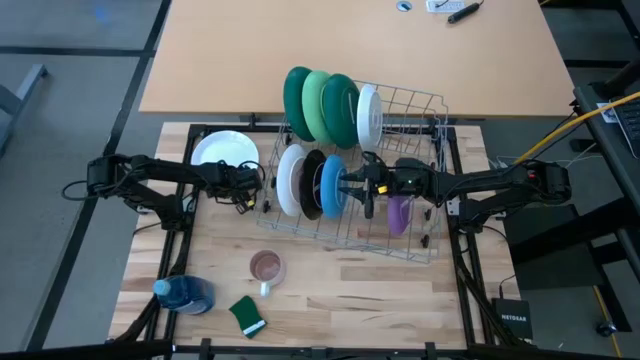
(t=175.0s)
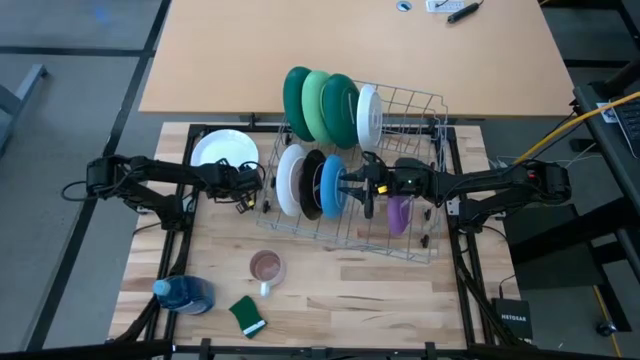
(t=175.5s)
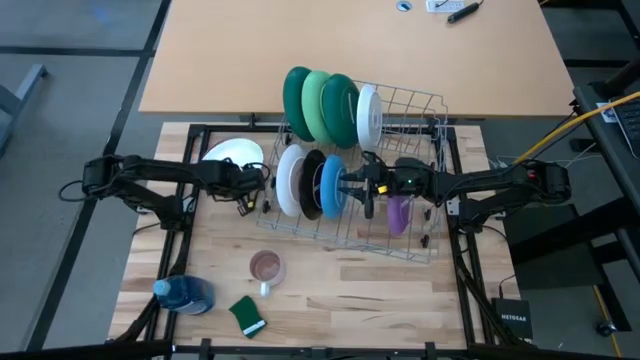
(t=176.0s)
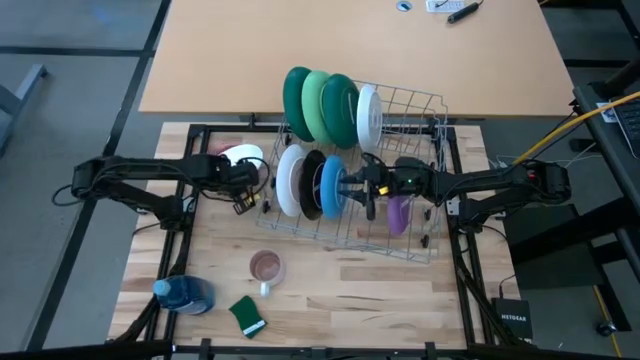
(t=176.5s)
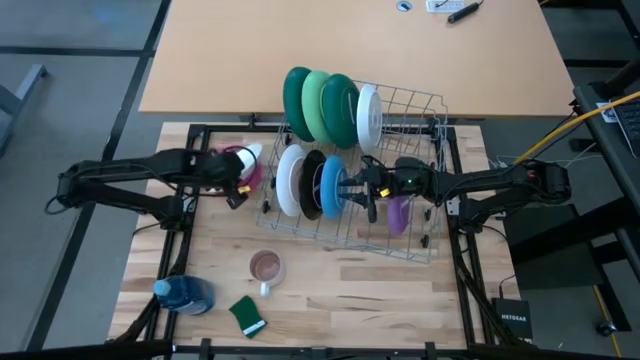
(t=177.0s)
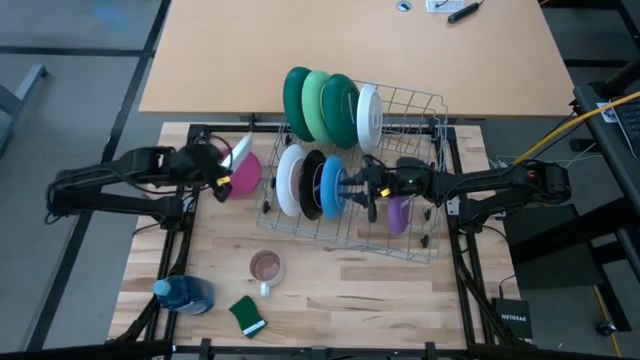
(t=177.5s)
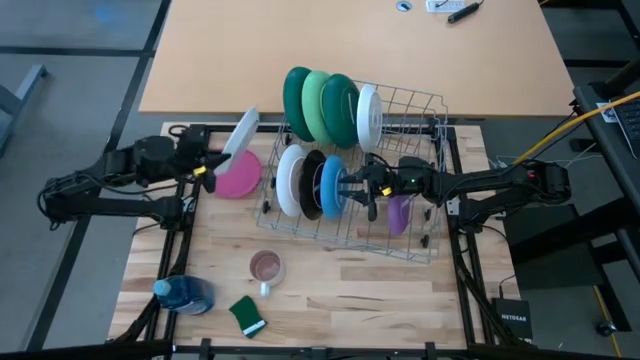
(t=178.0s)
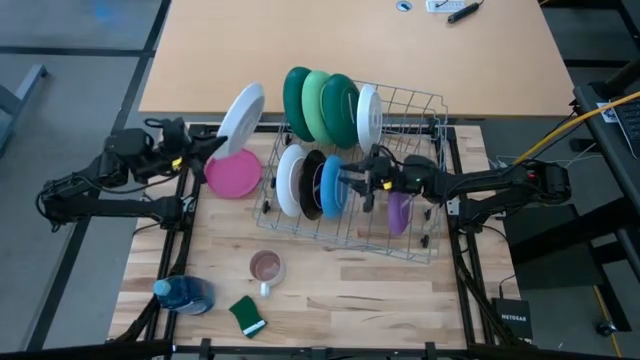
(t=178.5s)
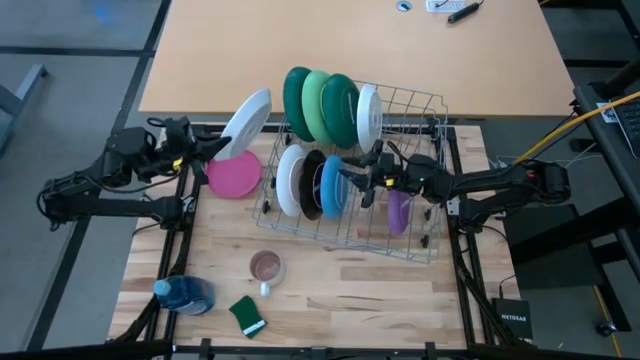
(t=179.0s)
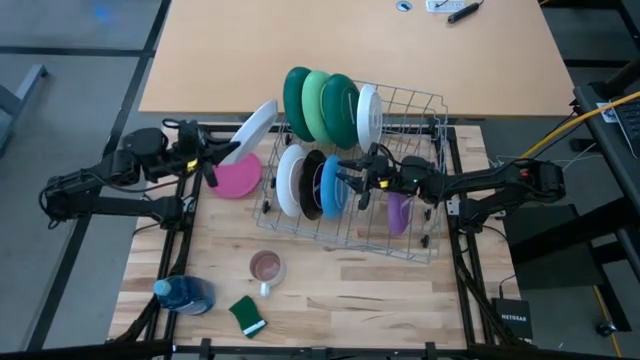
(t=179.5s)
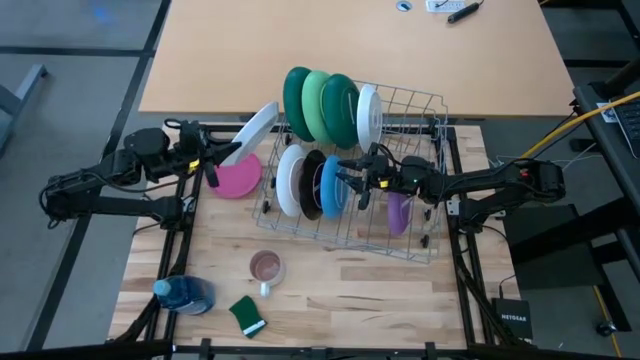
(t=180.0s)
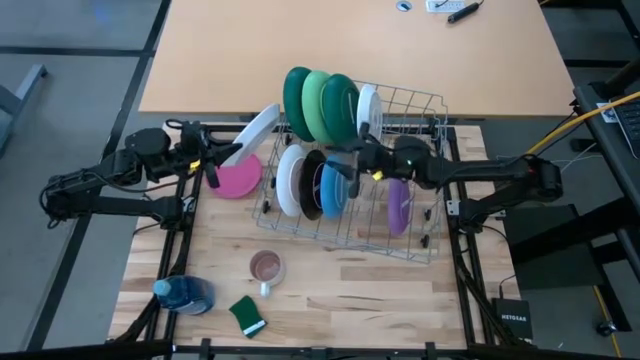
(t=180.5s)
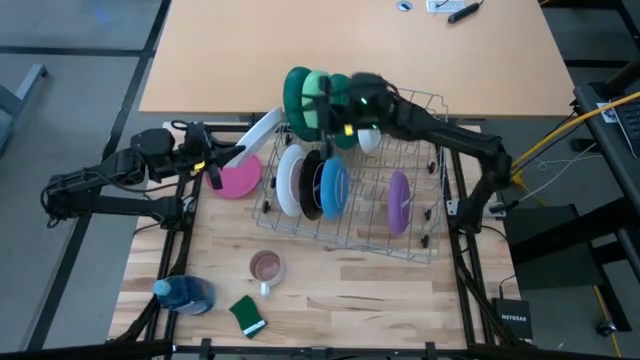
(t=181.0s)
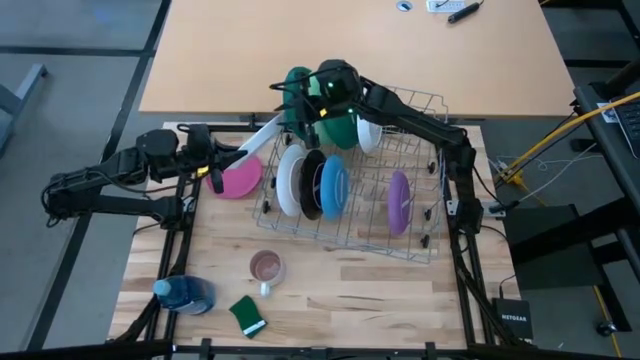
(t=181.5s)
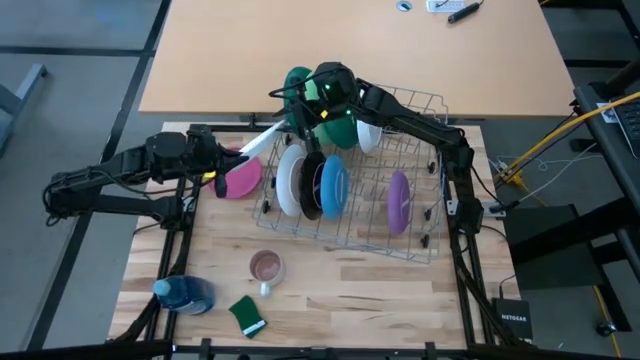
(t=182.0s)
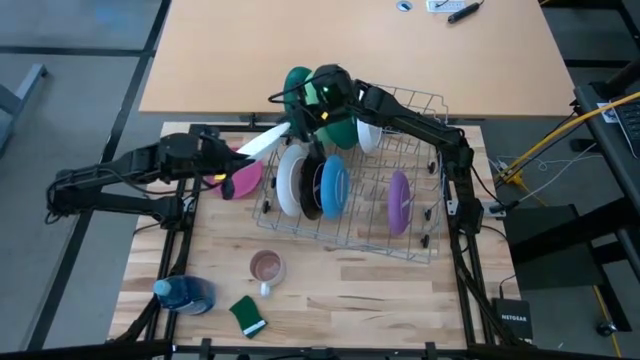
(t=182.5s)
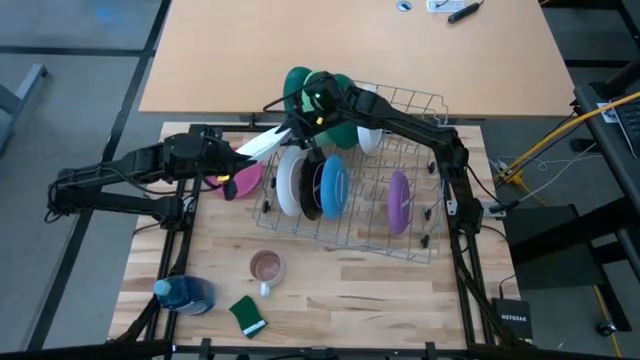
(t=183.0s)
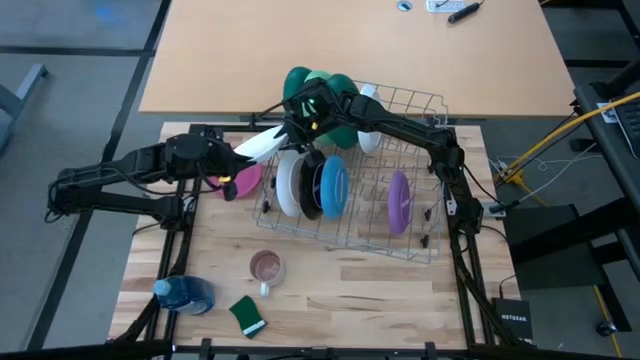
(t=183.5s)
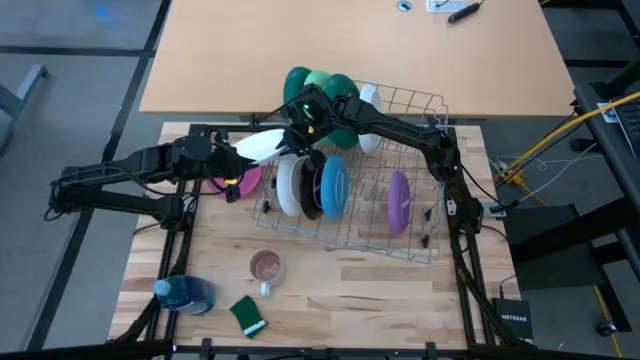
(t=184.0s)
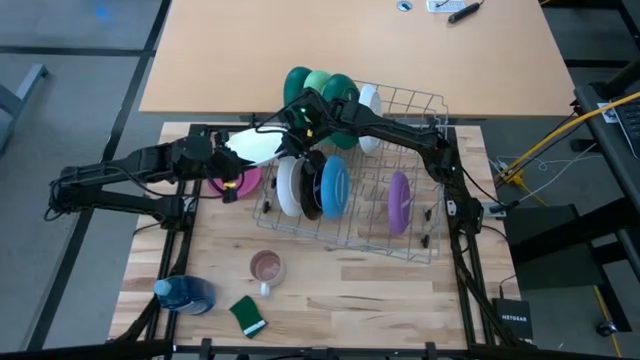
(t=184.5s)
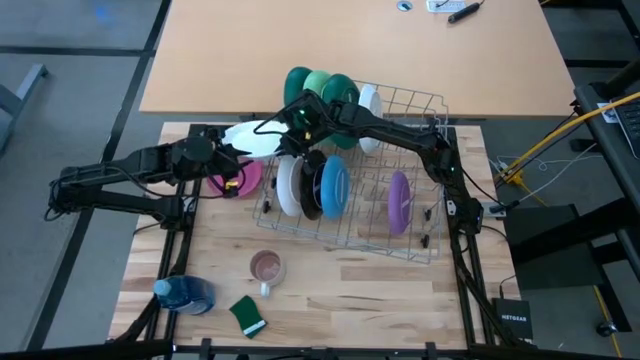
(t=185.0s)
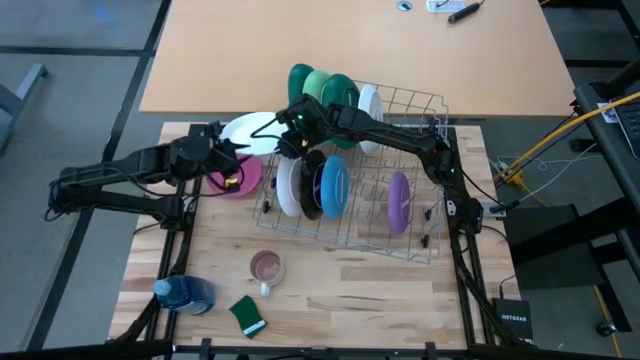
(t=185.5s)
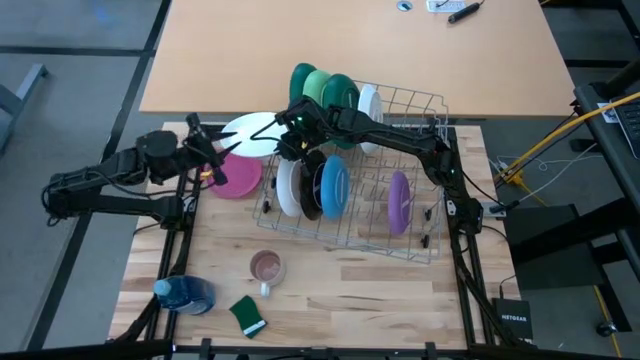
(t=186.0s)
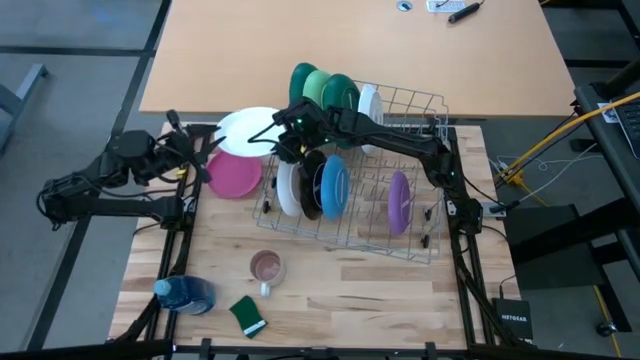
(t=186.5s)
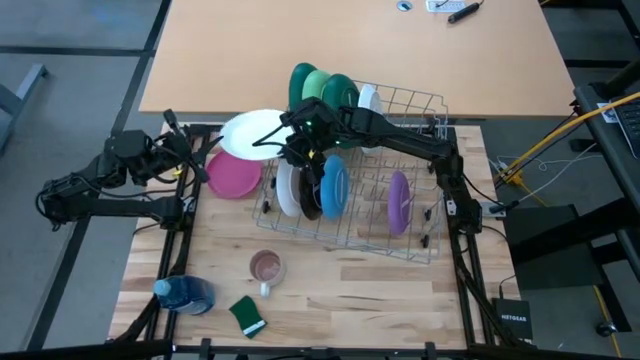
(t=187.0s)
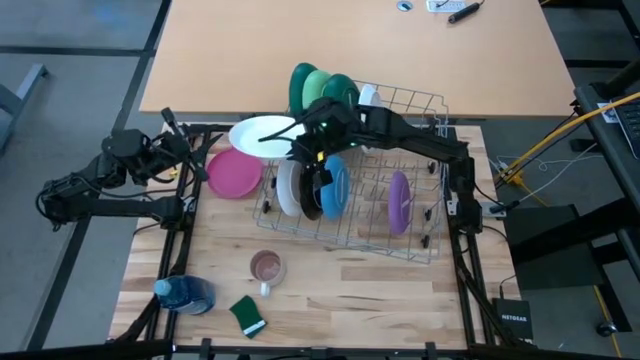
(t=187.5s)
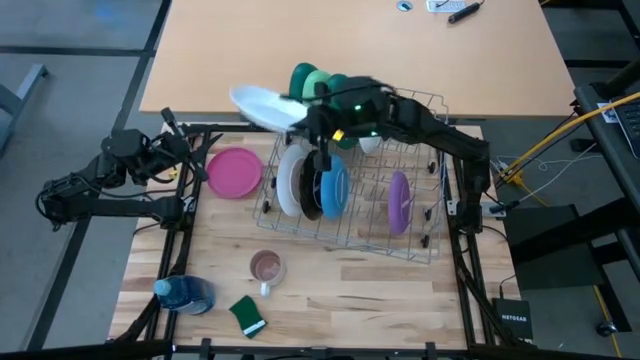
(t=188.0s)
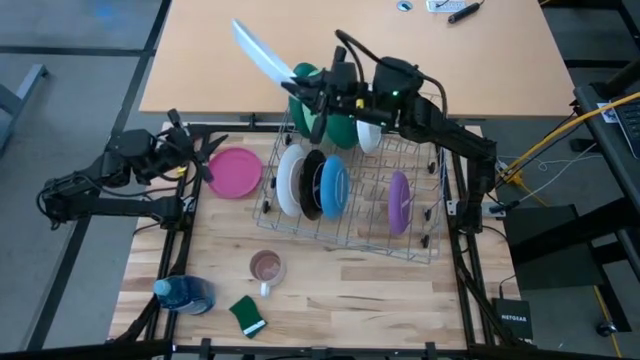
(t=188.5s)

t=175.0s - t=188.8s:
Task: Sort dishes
Put the white plate into the dishwasher rack

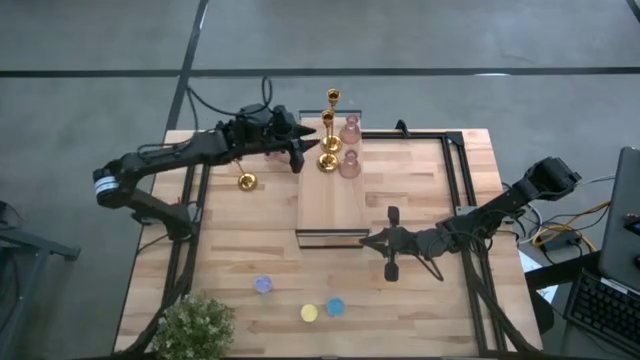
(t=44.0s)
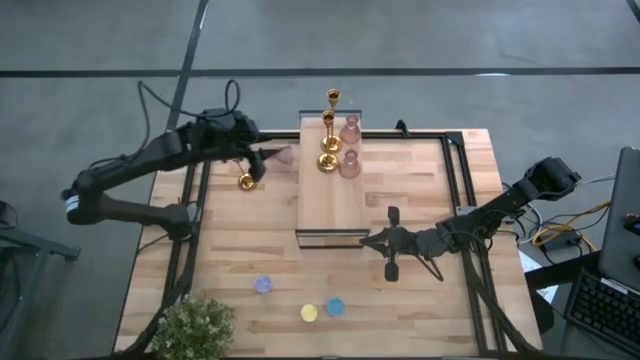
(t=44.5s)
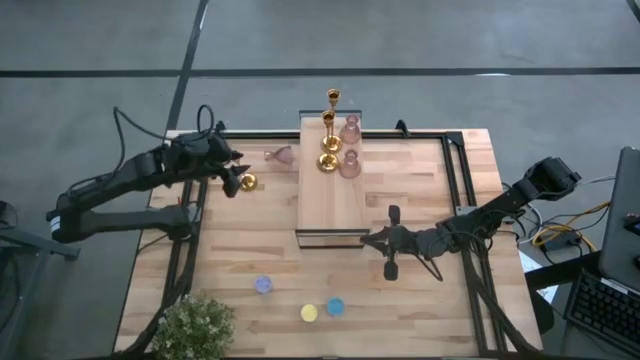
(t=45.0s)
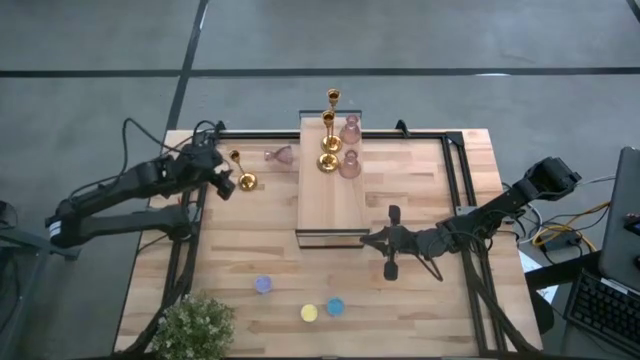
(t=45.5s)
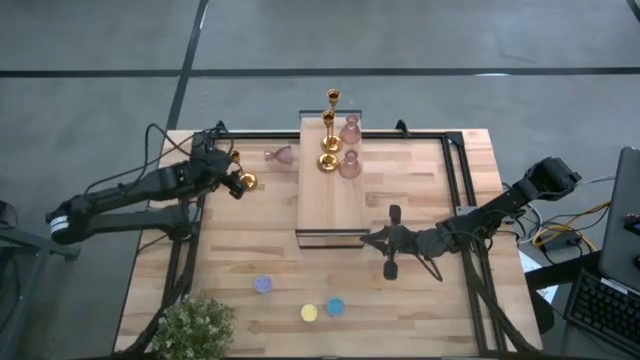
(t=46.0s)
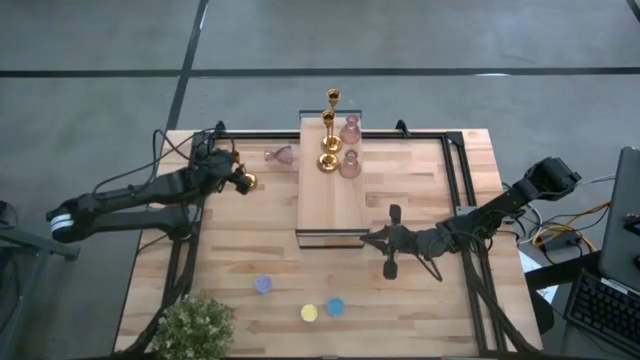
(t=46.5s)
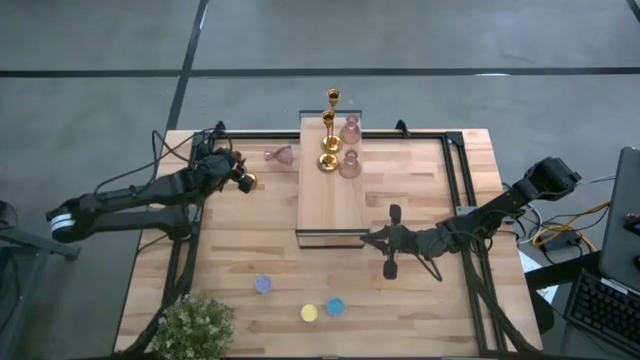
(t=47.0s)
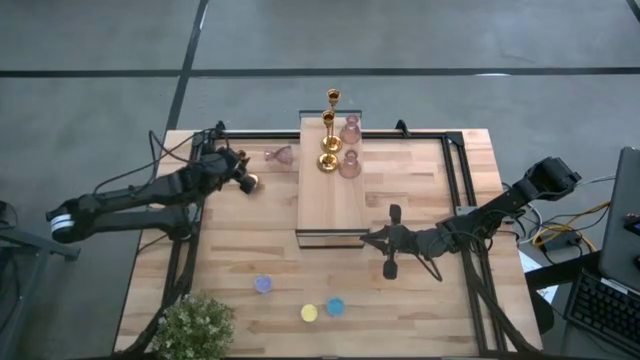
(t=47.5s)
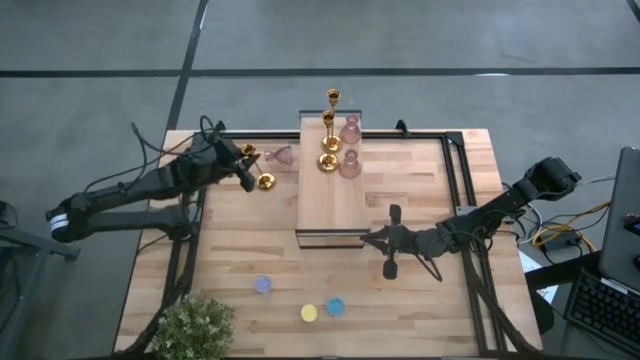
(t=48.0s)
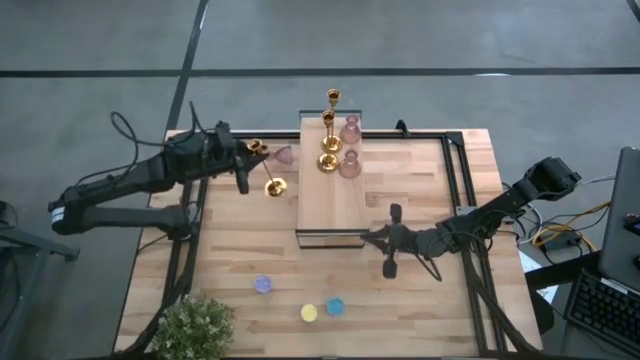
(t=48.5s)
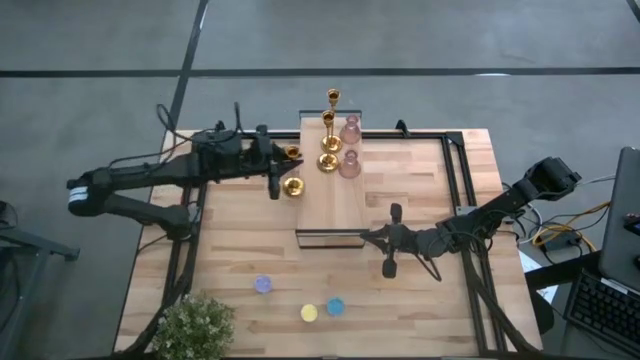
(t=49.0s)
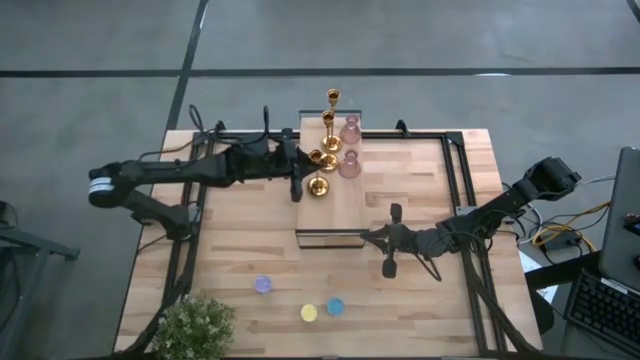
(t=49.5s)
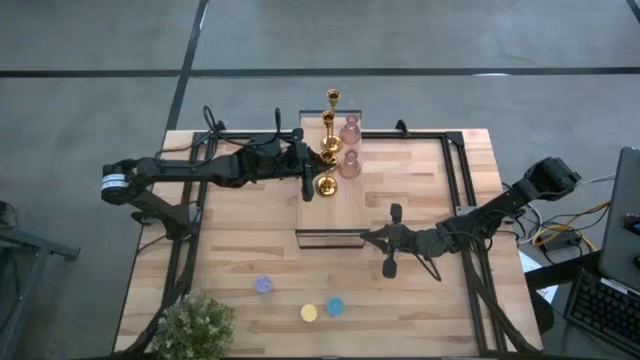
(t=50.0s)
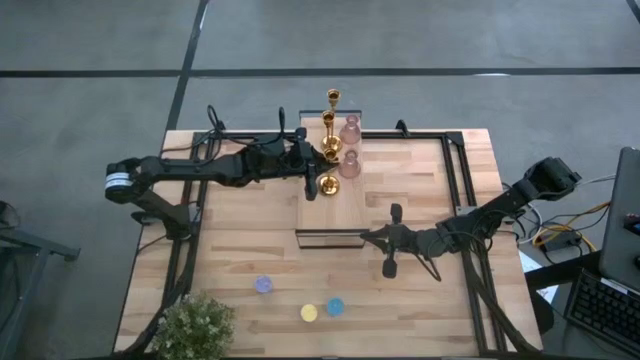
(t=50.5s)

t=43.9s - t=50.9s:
Task: Pick & Place candle stick holders
Put the gold candlestick on the shelf
